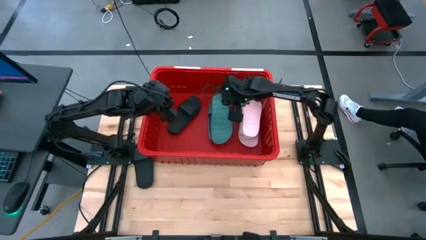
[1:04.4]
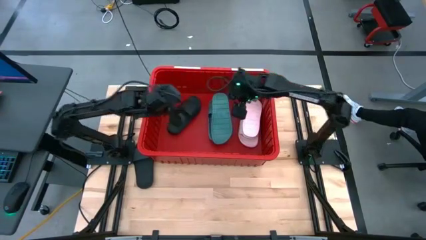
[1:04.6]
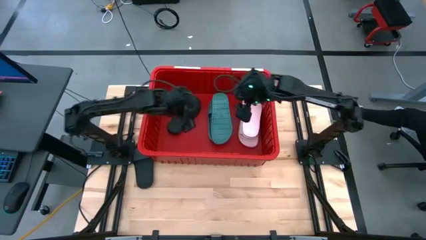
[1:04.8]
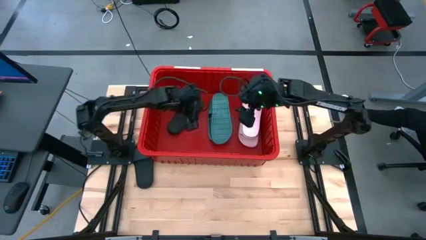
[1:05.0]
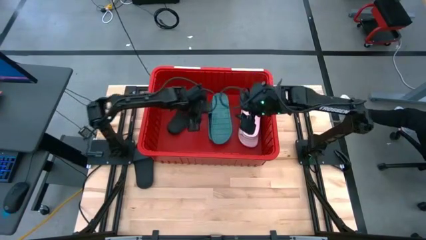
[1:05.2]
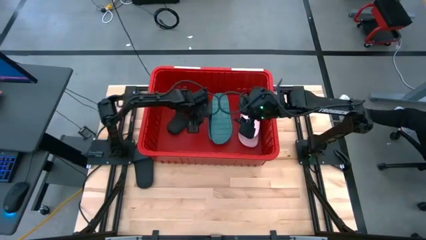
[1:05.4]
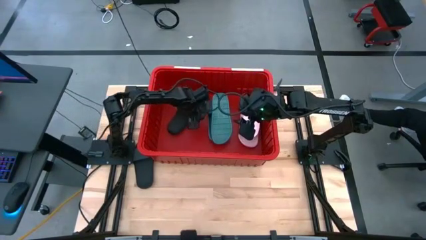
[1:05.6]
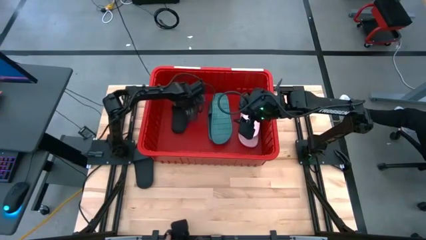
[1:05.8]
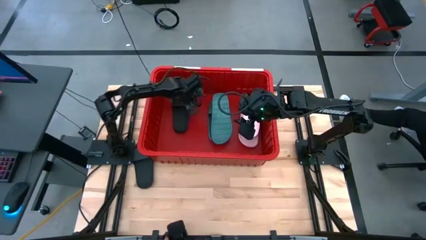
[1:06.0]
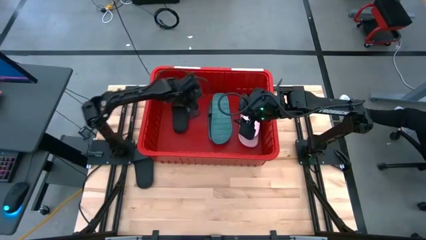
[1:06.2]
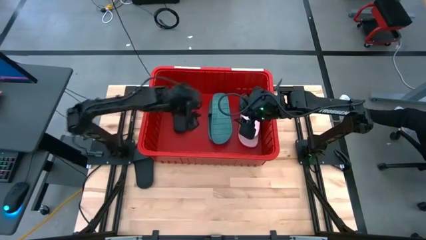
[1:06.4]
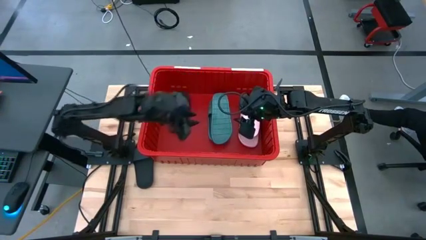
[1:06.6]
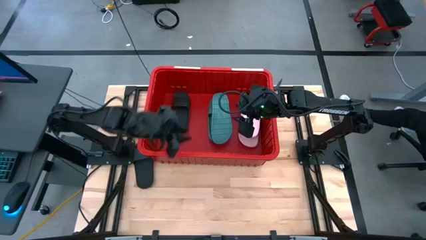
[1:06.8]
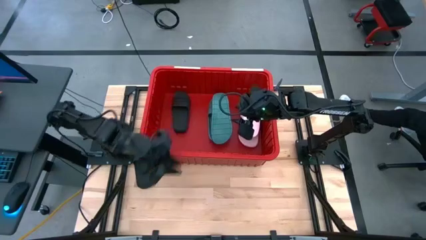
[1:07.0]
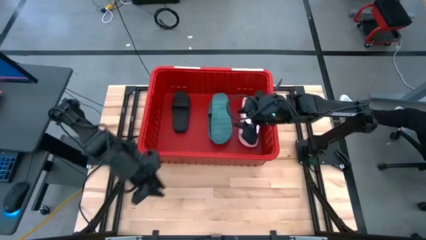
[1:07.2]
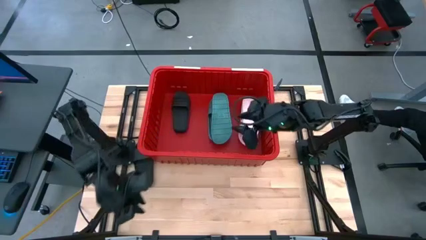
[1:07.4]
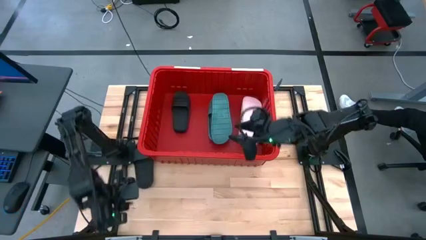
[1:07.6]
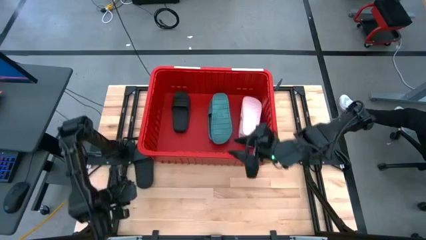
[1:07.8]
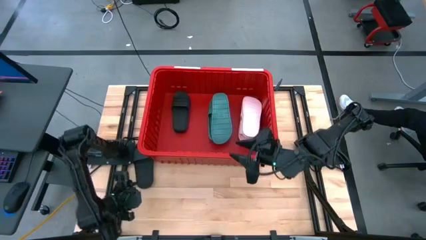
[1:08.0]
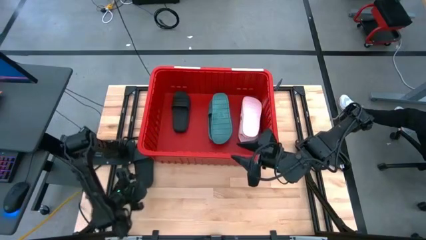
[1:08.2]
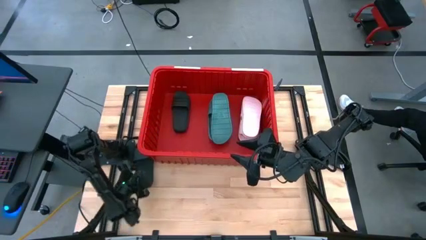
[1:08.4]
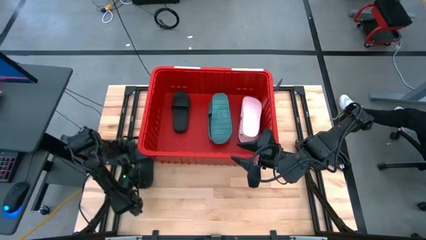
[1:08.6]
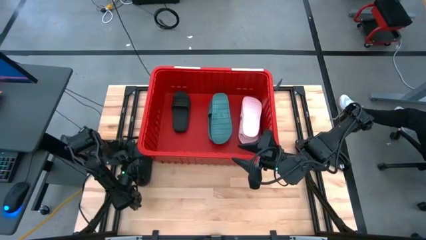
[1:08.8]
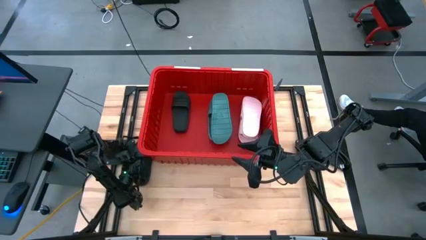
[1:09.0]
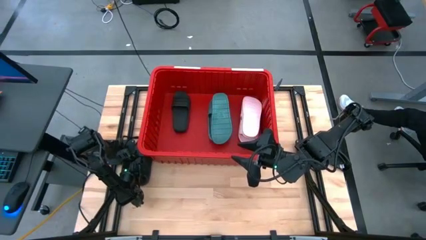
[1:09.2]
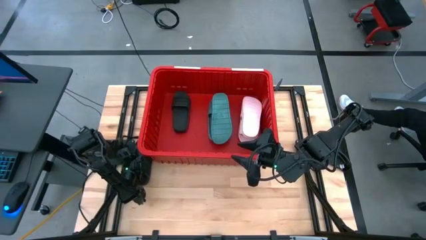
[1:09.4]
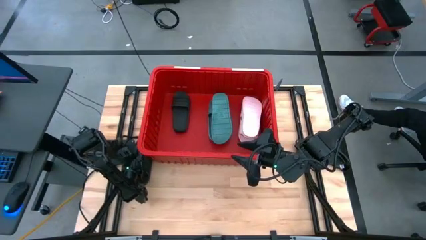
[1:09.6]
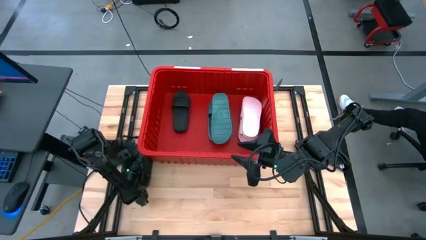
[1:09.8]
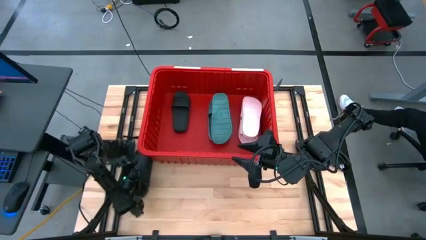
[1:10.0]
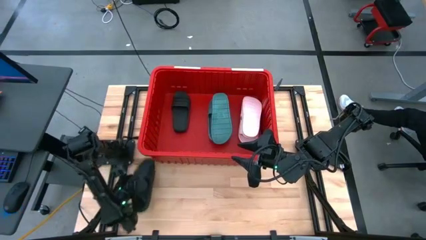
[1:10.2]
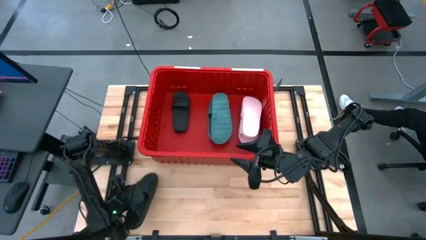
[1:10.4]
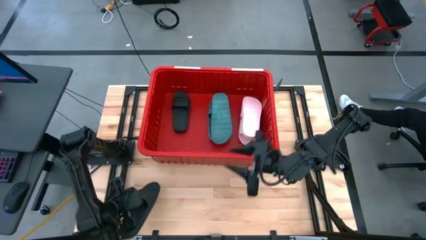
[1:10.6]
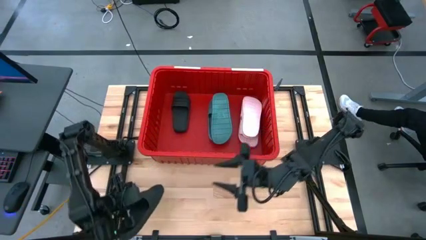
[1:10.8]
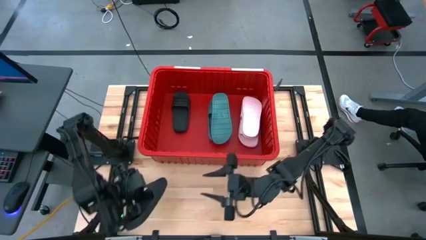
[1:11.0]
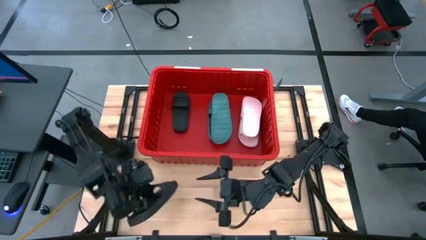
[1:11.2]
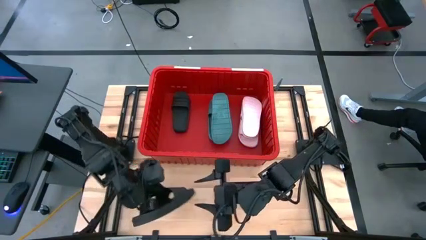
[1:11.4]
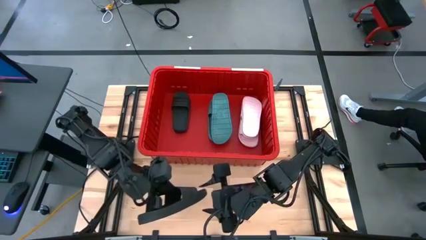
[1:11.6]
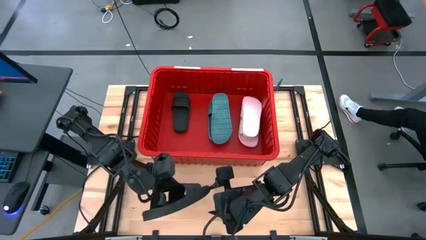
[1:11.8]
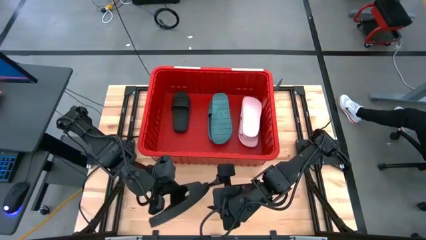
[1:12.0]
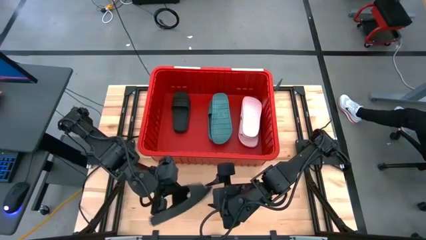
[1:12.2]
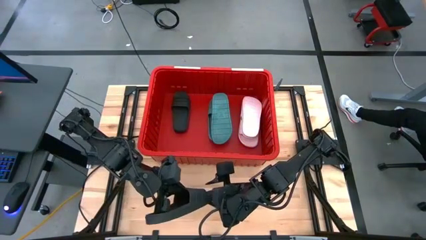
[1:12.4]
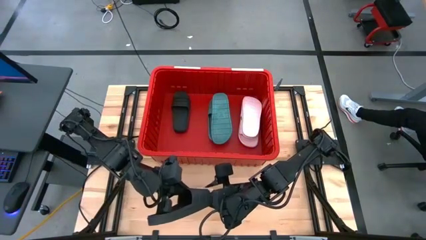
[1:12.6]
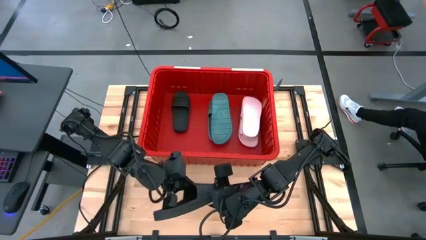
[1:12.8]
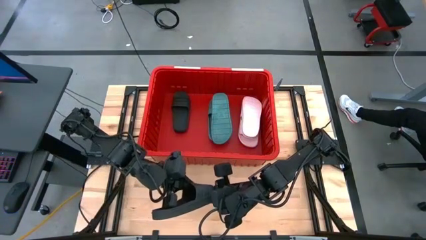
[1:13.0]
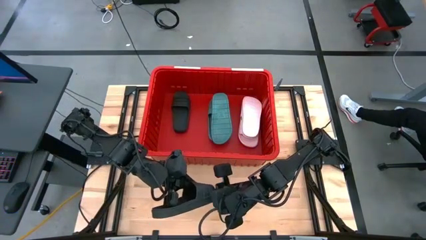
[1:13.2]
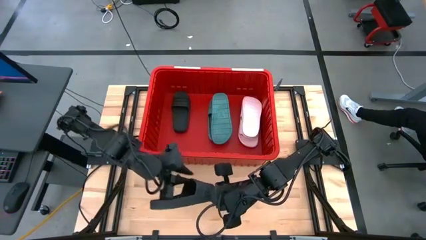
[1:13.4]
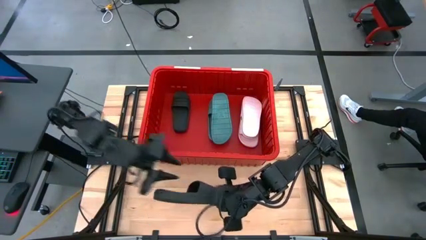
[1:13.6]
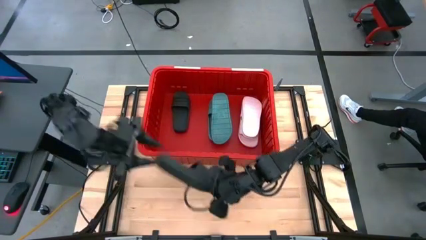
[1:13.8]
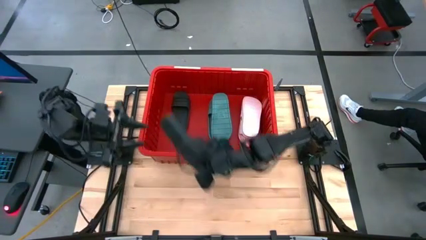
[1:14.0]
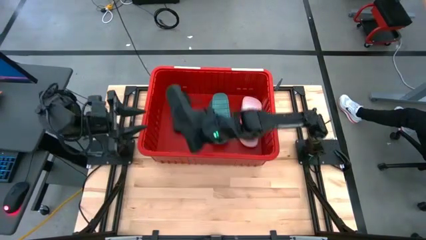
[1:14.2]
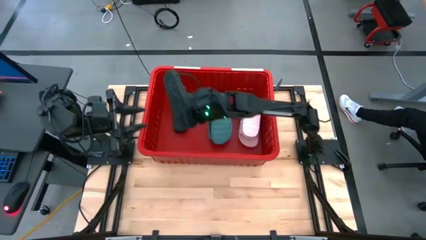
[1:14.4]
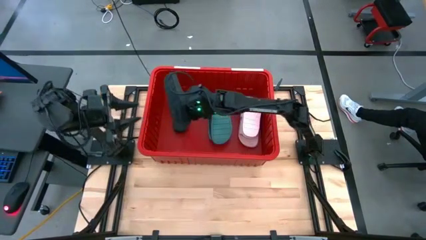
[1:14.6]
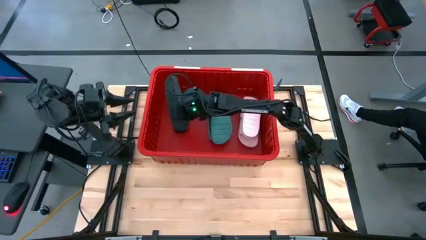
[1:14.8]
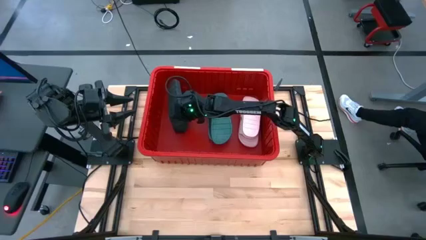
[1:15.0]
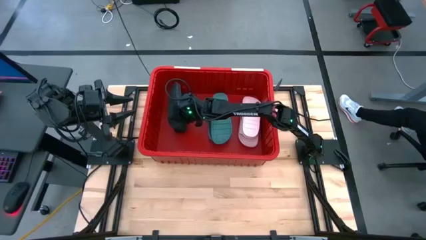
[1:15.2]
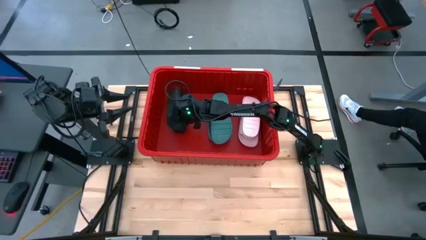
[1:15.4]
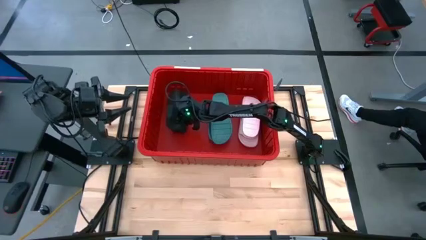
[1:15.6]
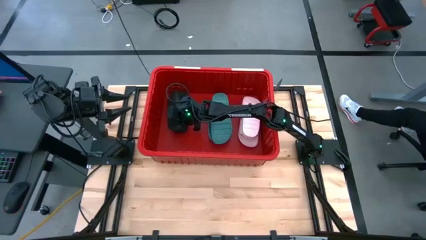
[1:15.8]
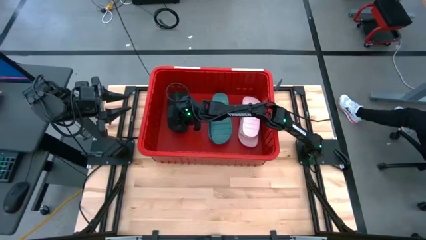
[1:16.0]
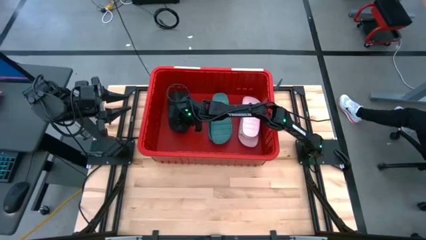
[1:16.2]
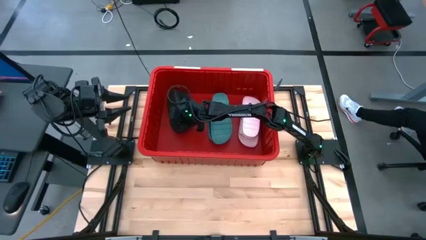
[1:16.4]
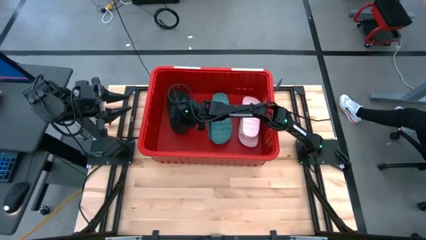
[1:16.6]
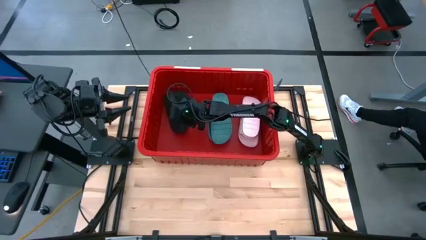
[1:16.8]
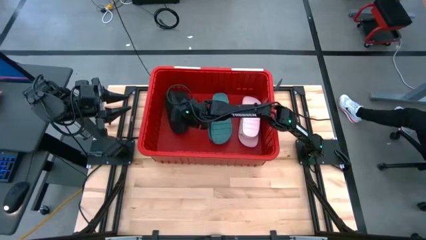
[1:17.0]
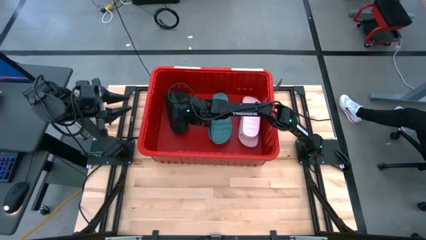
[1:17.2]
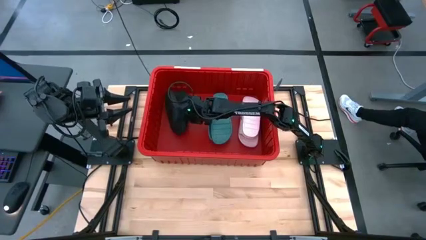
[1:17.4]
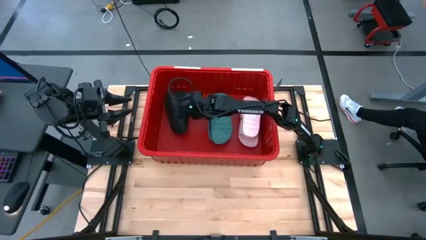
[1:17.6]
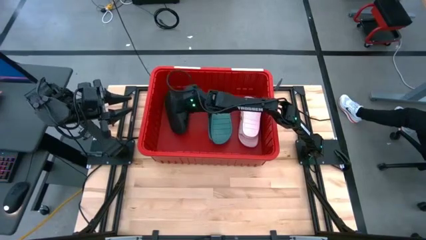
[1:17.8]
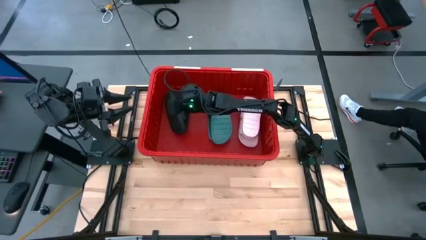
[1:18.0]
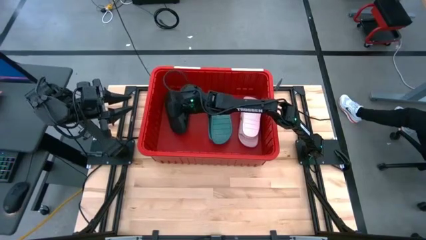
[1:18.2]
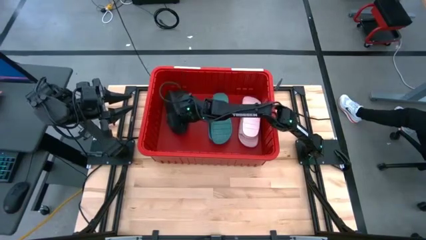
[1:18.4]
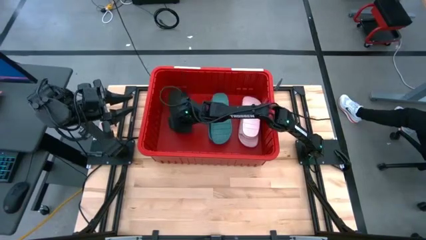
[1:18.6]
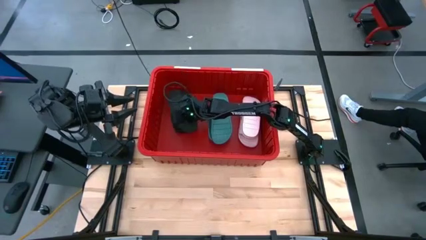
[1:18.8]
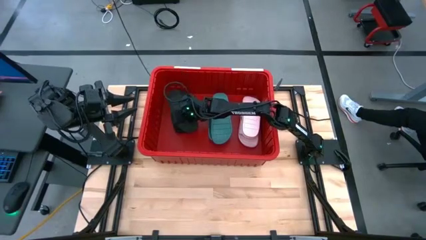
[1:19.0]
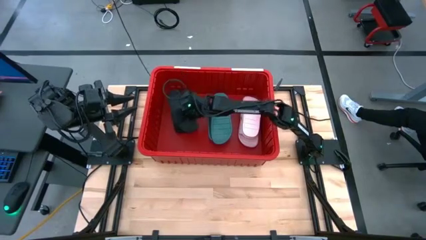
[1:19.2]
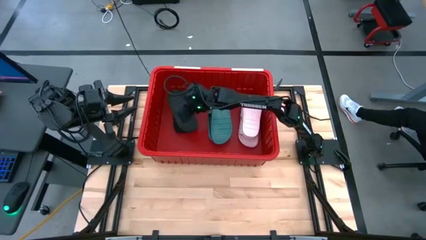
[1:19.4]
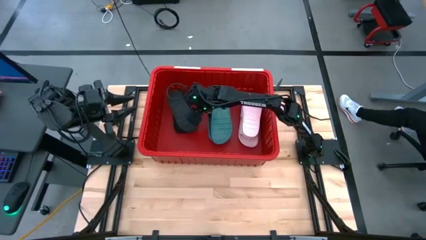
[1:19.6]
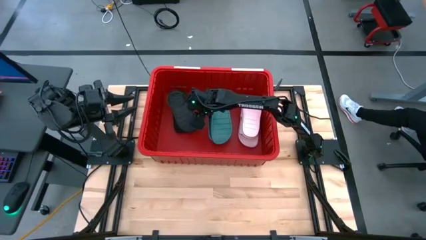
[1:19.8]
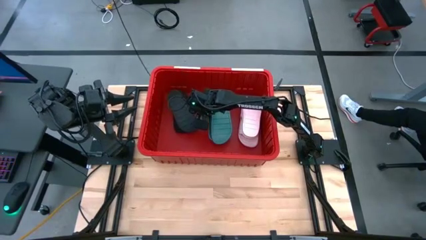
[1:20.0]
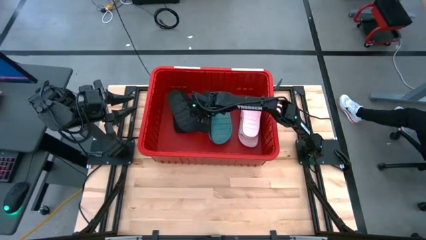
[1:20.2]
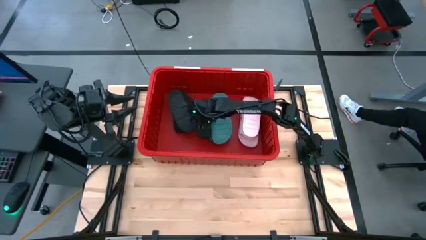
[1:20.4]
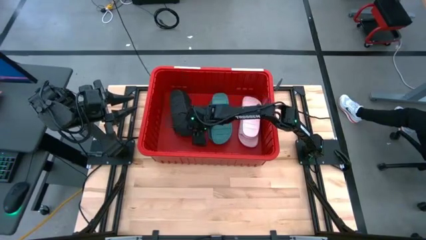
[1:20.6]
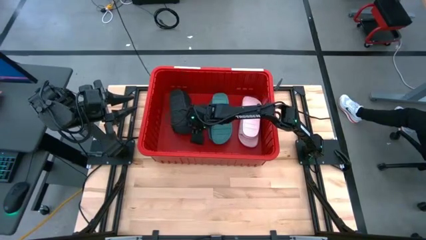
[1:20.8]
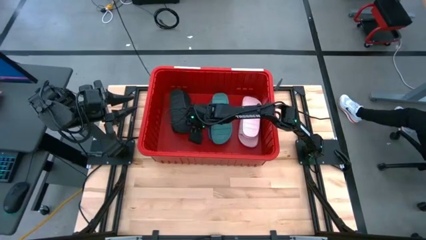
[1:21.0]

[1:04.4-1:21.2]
Task: Pick and place slides into bin
Put the black slide in the red bin
